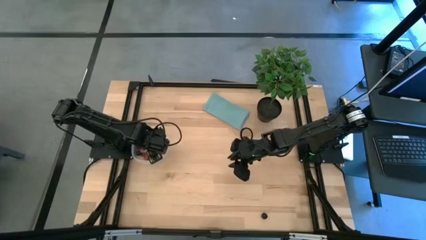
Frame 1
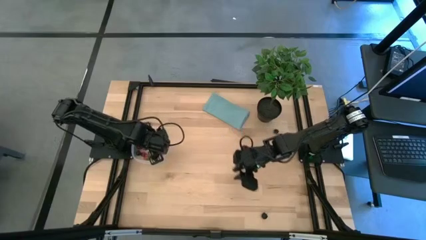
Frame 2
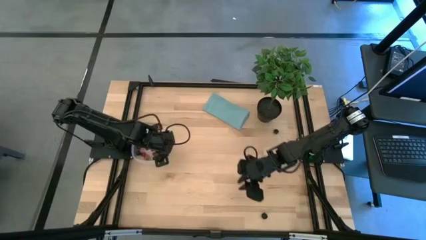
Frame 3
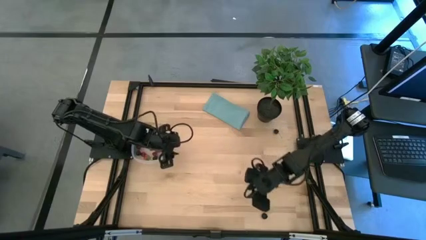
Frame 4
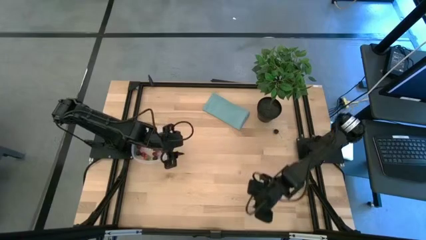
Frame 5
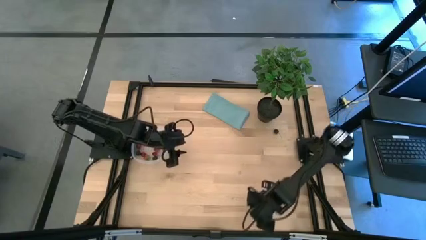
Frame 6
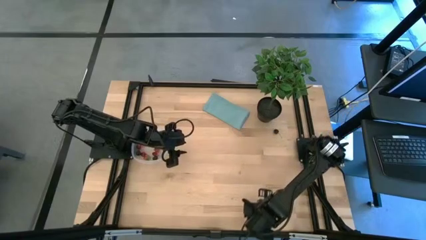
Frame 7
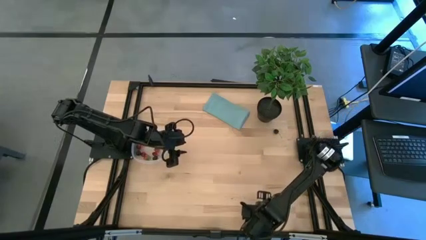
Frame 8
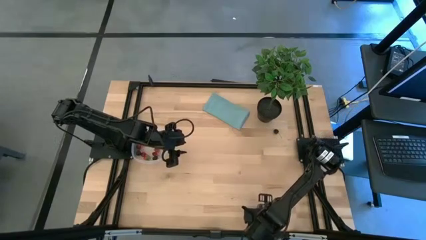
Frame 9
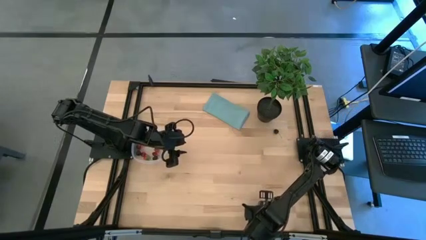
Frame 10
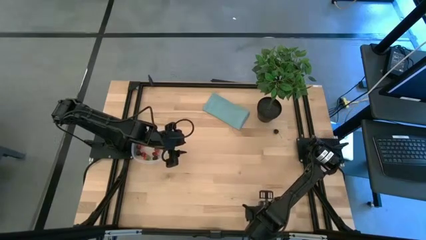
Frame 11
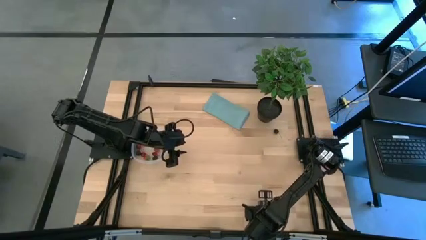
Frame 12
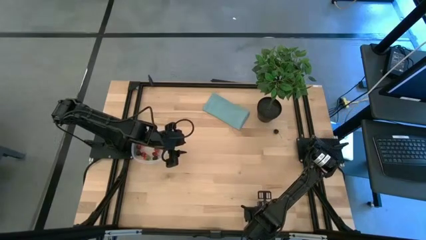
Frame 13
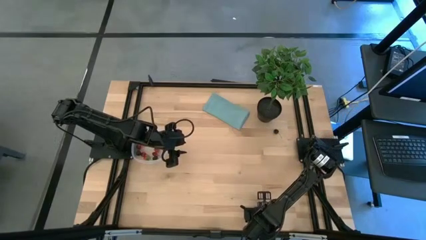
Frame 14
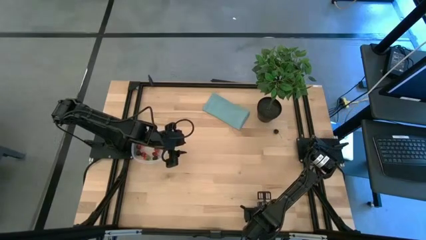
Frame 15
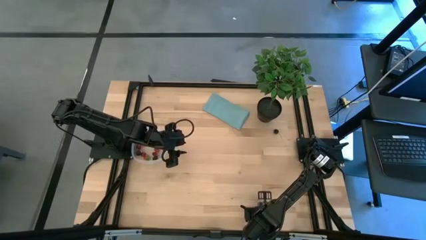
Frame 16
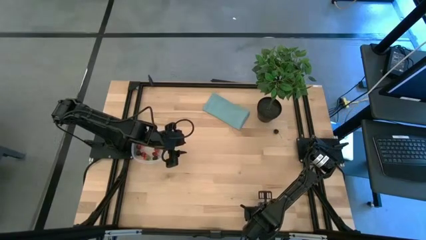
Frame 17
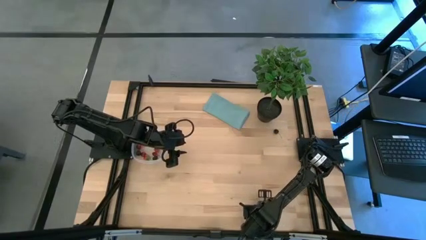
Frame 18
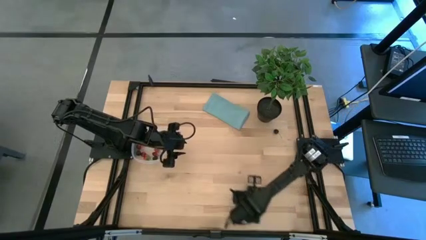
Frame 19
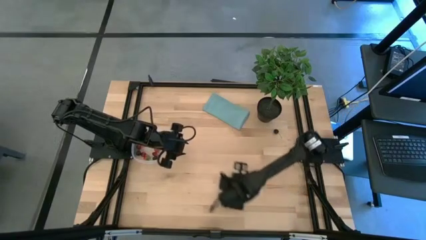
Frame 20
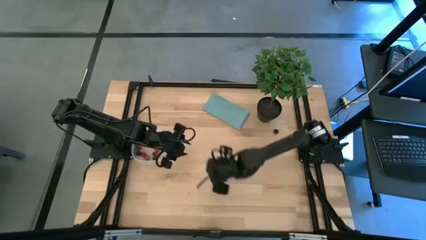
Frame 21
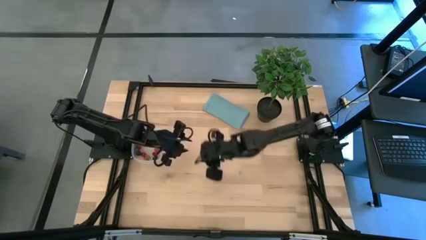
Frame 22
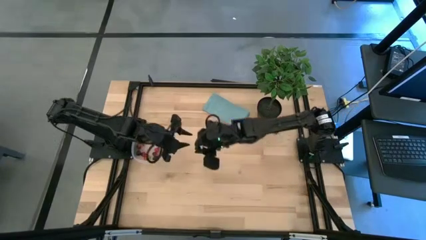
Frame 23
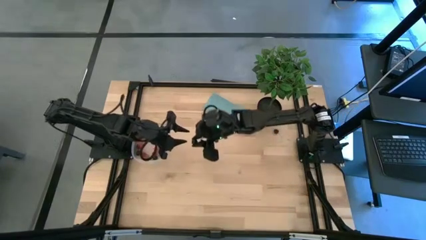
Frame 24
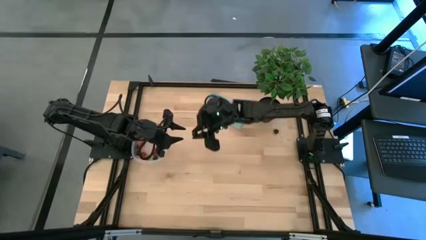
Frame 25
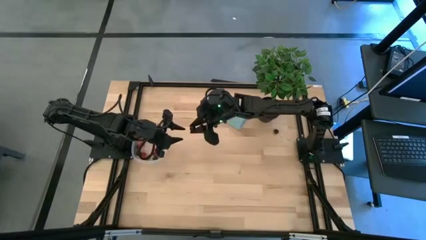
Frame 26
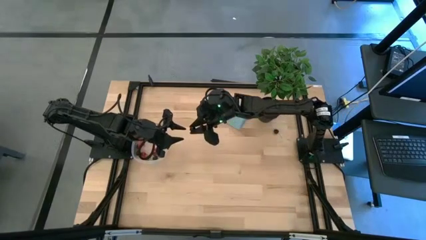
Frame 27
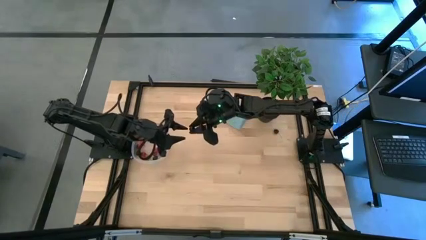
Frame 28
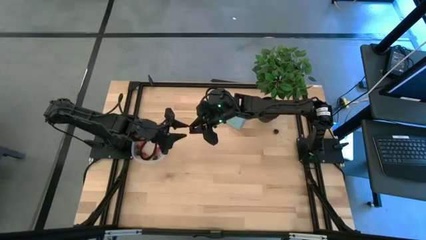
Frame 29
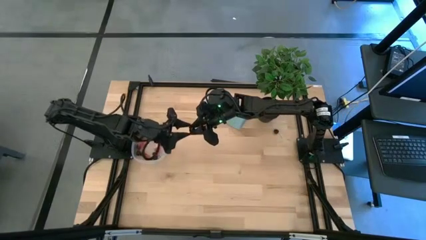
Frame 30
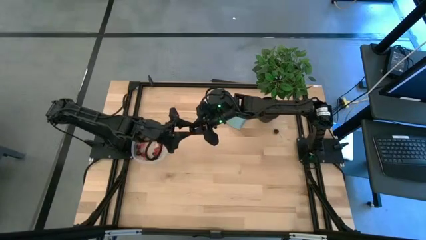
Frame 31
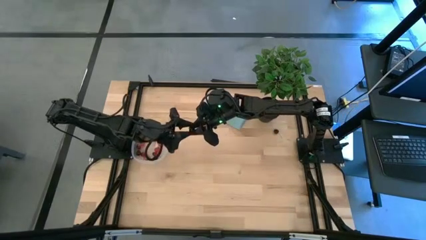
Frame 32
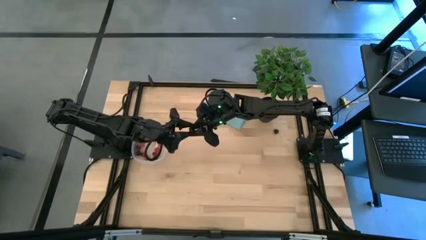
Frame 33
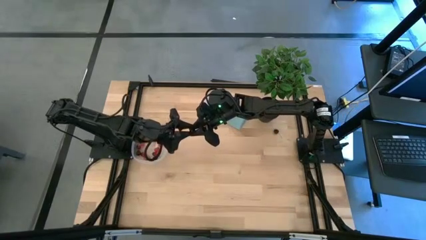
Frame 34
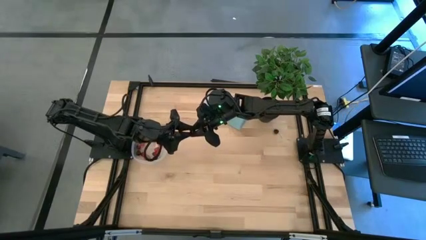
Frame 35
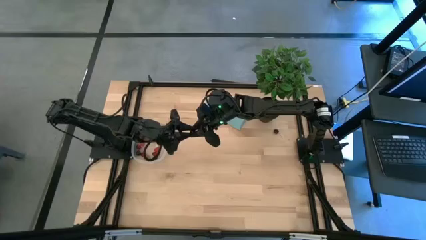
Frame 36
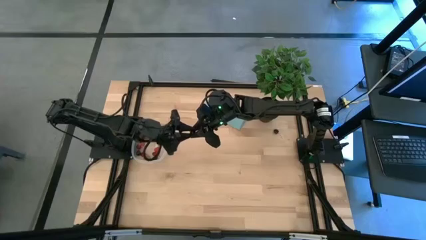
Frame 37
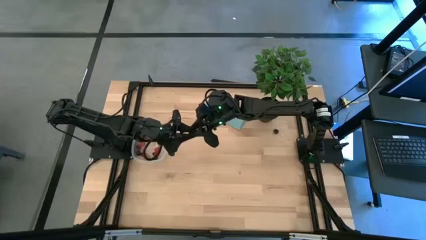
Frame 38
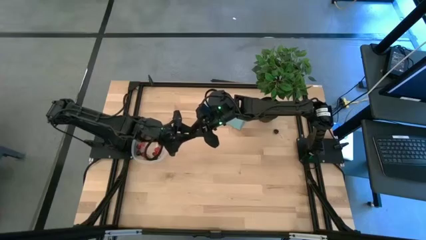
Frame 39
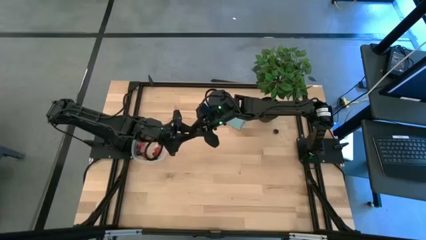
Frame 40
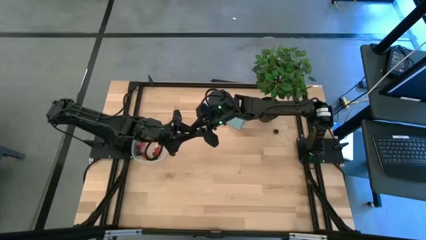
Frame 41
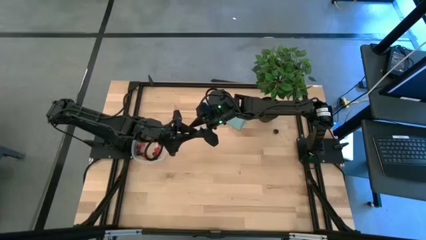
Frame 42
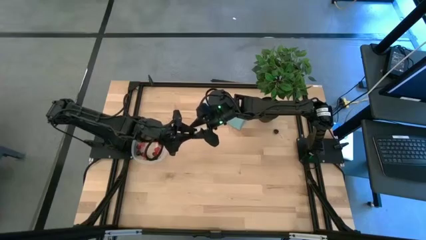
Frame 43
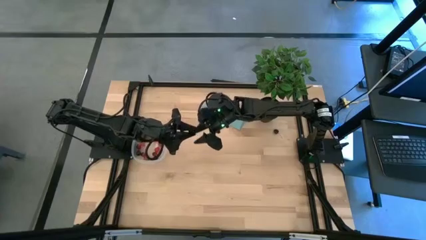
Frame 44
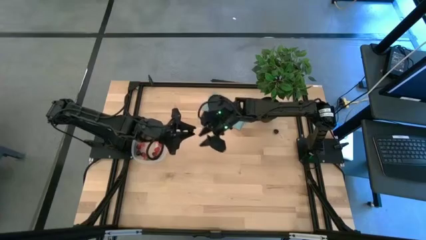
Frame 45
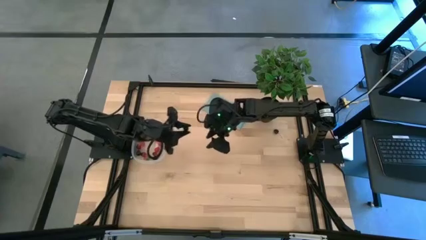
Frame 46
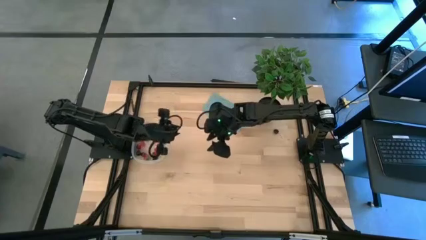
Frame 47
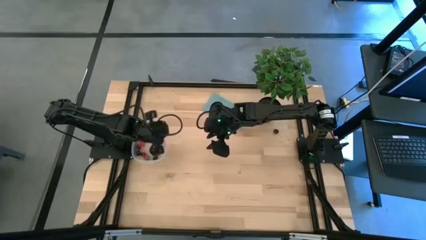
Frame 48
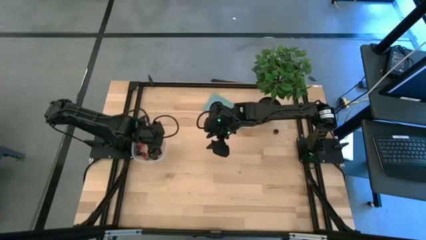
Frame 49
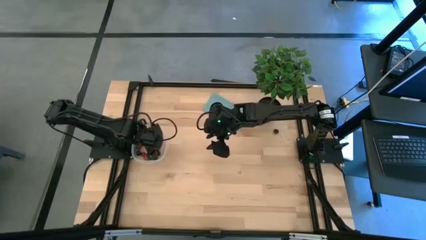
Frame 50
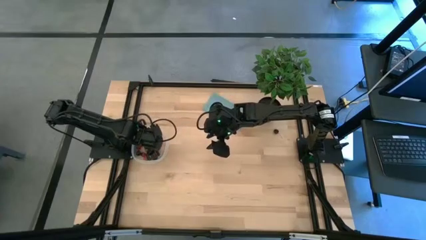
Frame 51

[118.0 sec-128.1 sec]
Task: Pick and placing Produce into tupperware
Put the bottom black cherry into the transparent bin

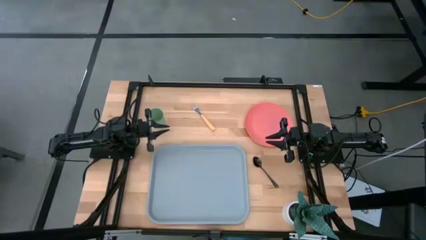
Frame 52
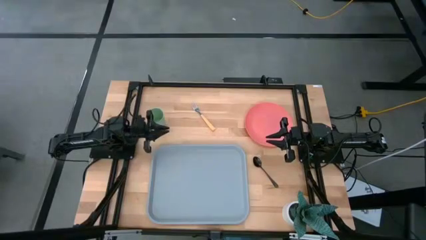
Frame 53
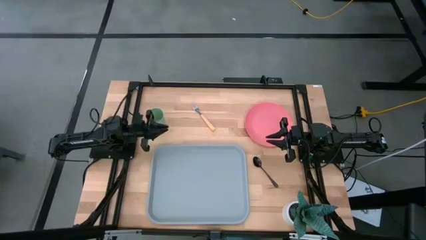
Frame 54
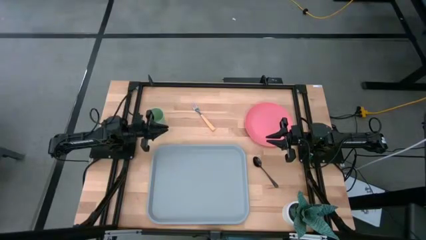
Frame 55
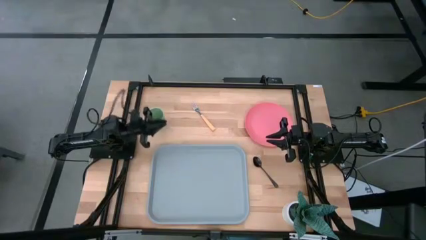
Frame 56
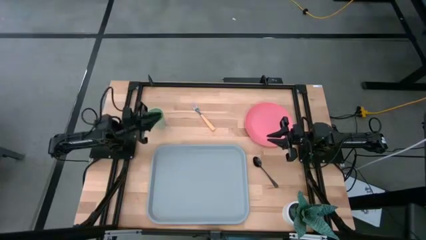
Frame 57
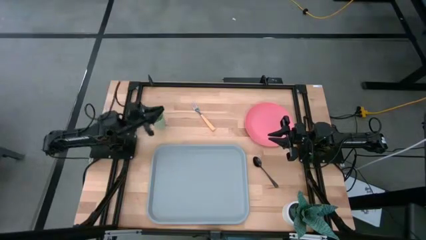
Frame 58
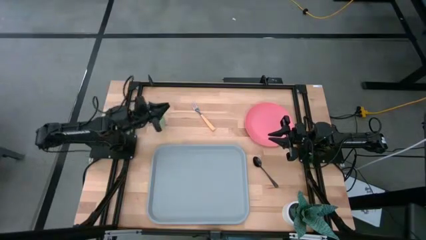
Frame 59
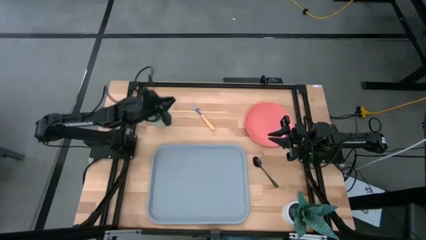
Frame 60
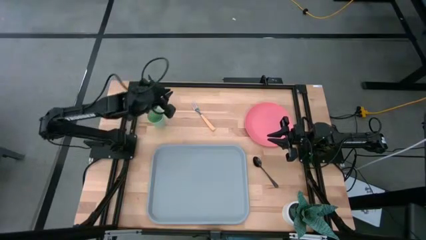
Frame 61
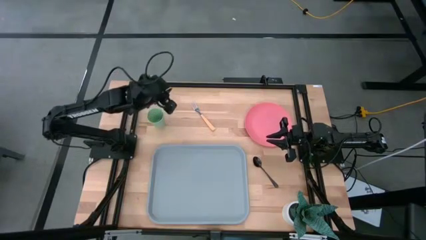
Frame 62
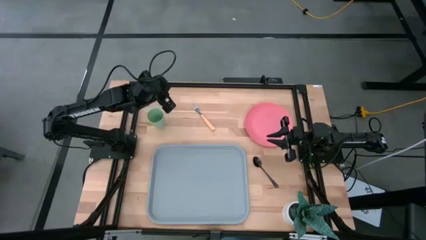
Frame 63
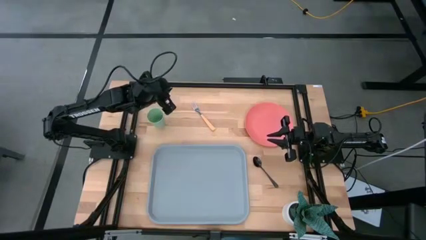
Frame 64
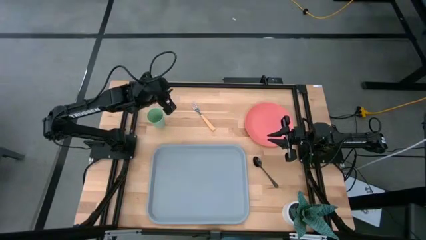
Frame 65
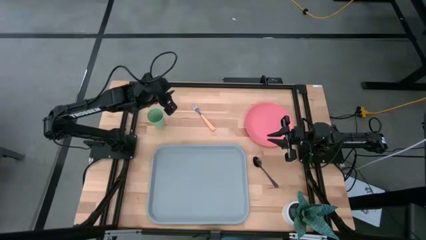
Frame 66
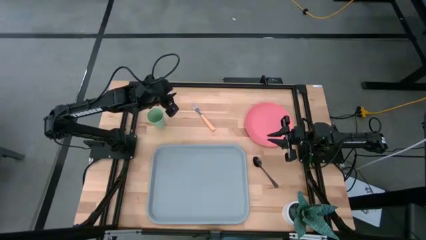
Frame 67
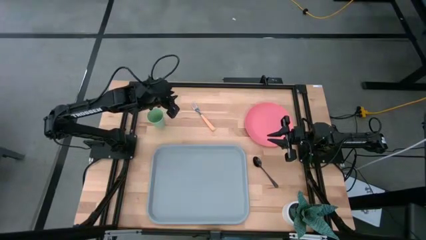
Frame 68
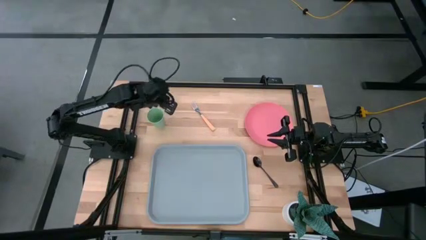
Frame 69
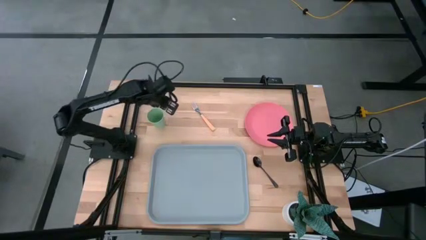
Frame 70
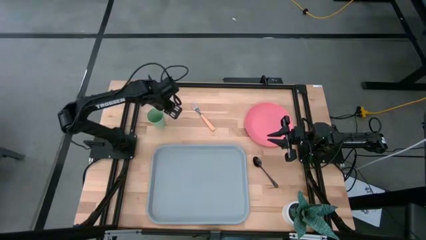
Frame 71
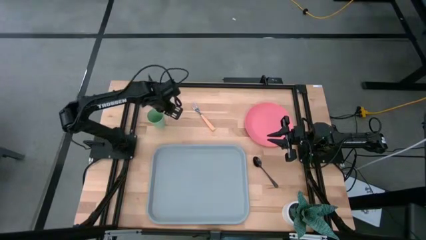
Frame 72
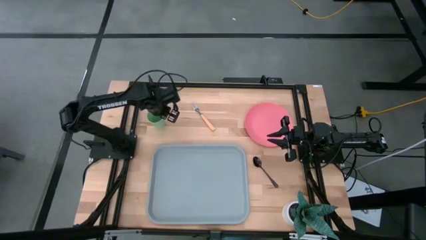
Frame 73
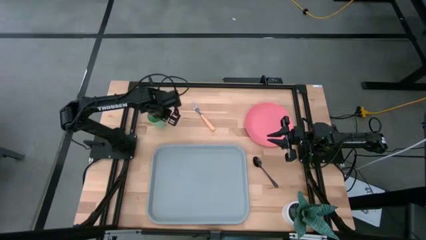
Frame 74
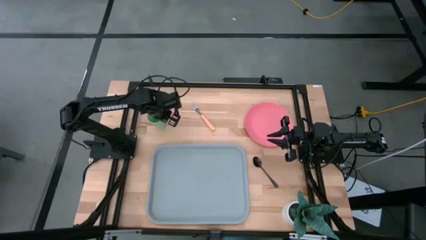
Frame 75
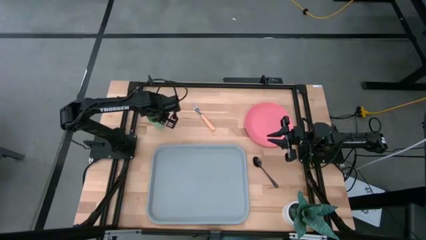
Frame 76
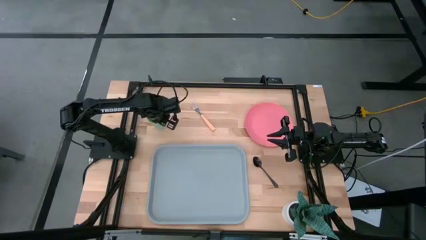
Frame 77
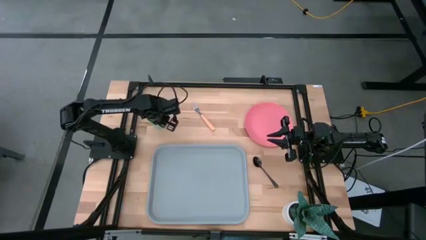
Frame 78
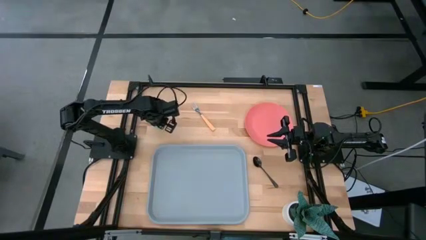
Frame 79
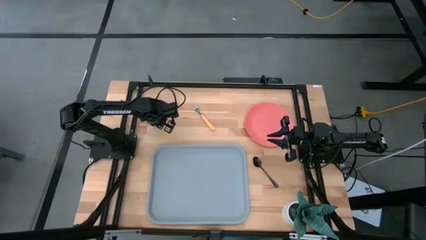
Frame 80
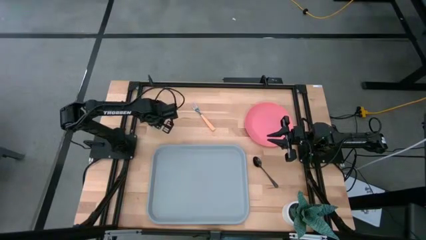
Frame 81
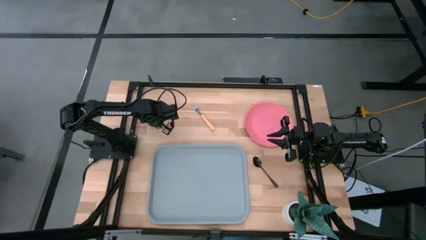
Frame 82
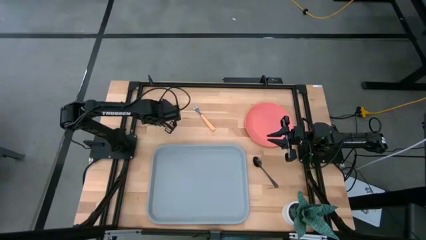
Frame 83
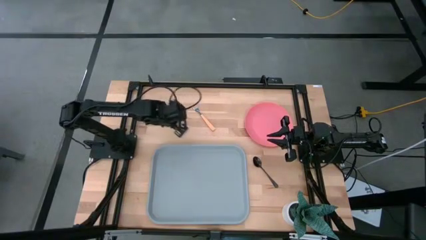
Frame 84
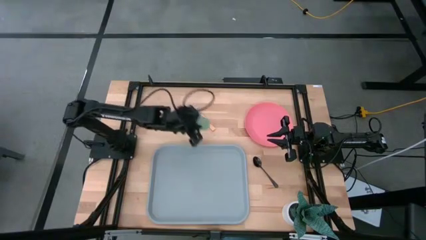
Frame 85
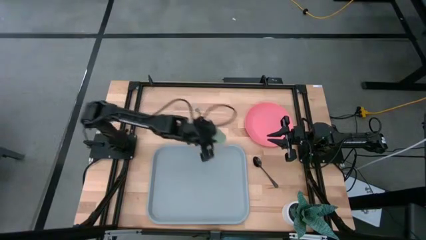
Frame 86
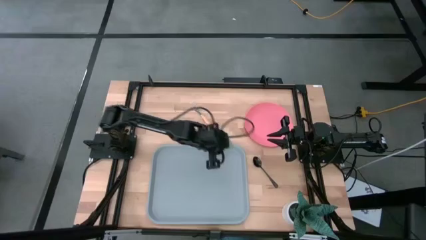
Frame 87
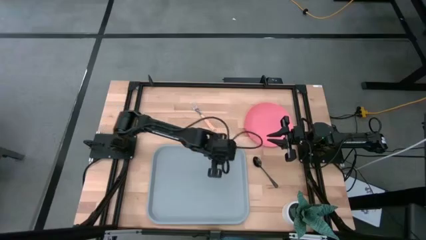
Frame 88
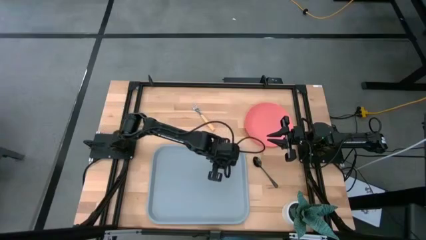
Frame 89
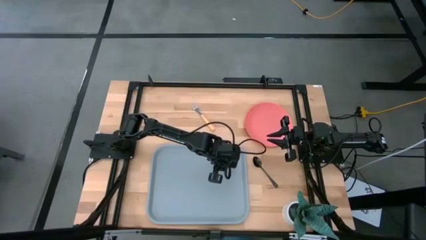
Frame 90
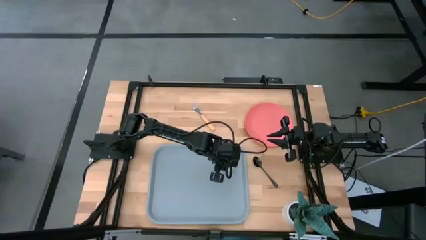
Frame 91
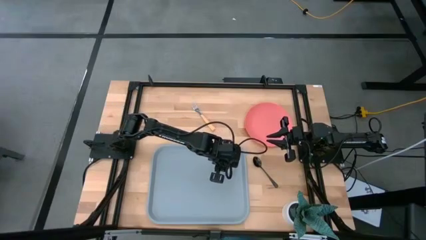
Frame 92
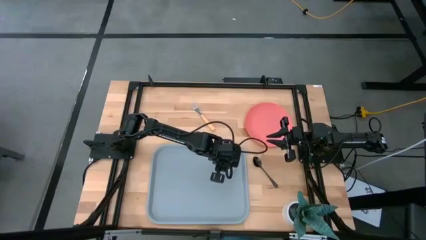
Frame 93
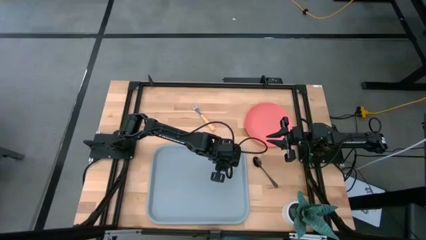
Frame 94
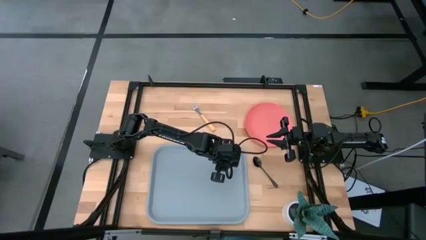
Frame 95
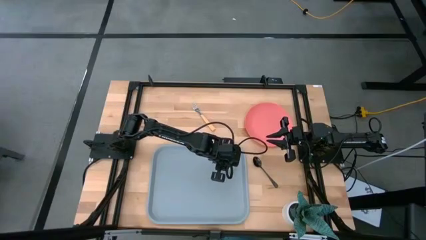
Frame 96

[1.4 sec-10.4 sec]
Task: Pick and place plate/cup/fork/spoon on tray
Put the green cup on the gray serving tray
